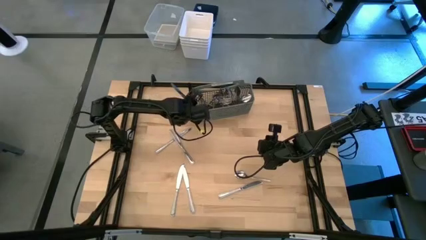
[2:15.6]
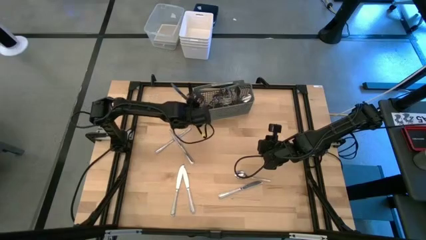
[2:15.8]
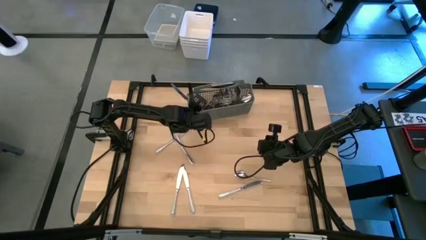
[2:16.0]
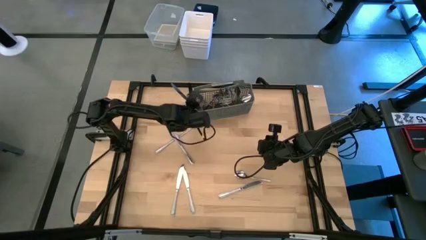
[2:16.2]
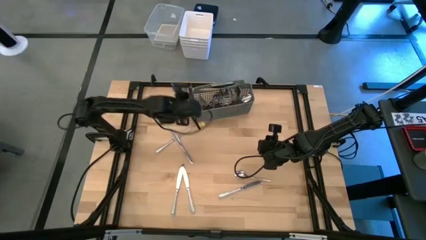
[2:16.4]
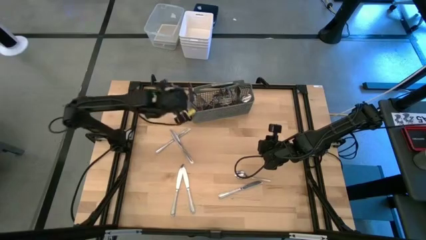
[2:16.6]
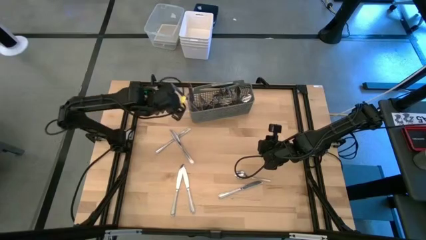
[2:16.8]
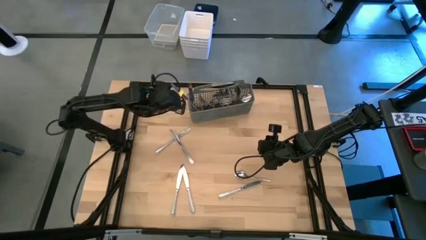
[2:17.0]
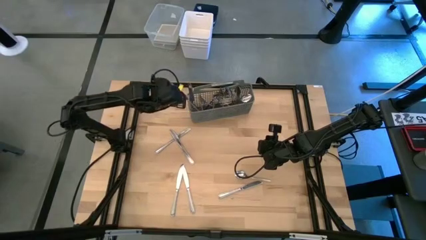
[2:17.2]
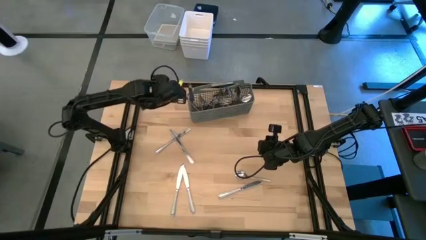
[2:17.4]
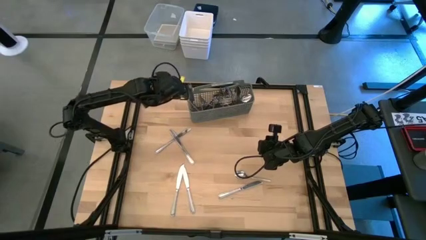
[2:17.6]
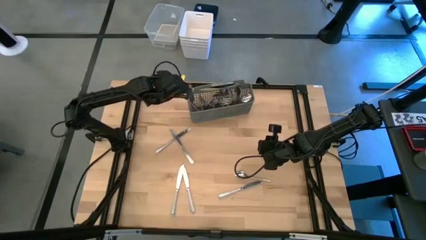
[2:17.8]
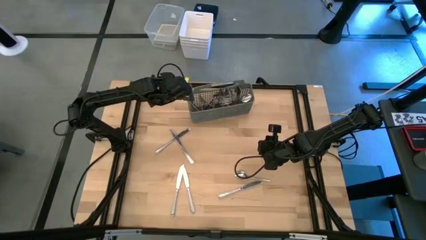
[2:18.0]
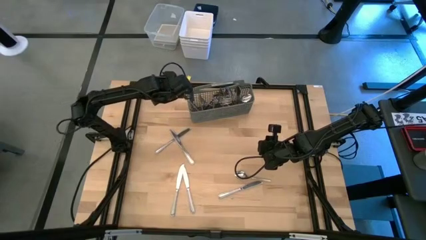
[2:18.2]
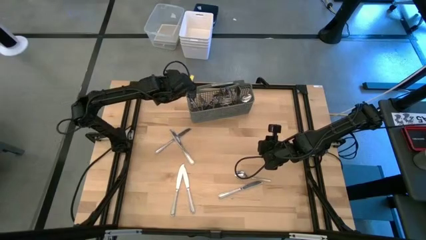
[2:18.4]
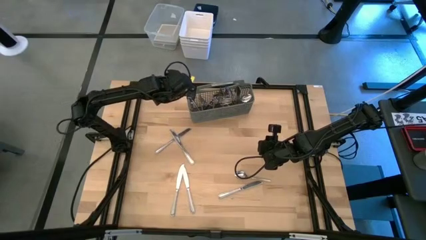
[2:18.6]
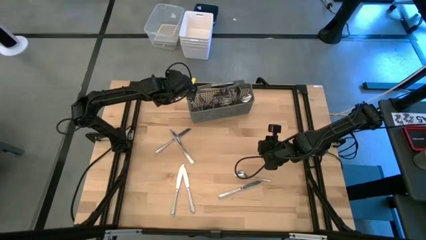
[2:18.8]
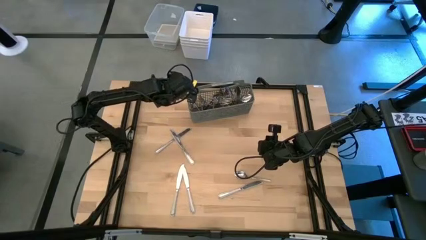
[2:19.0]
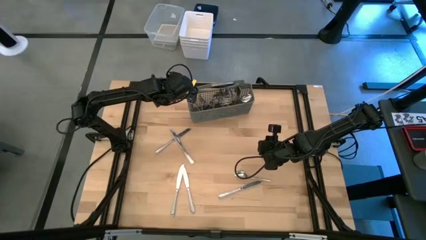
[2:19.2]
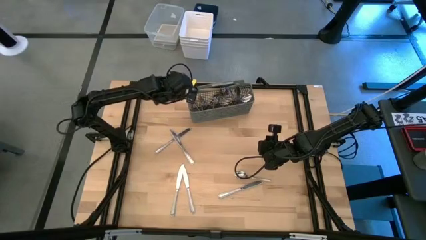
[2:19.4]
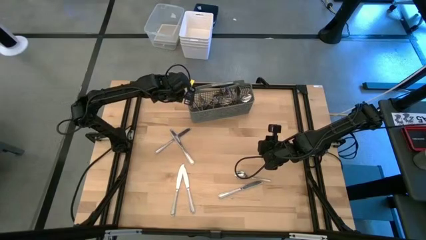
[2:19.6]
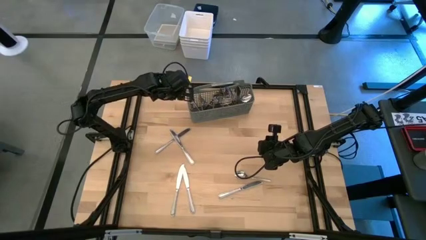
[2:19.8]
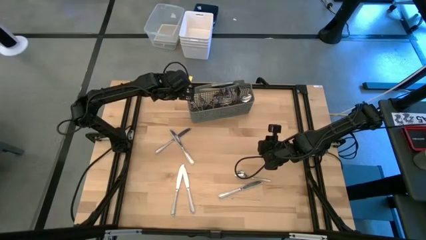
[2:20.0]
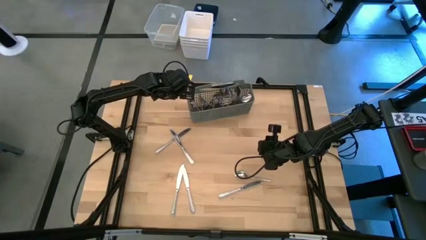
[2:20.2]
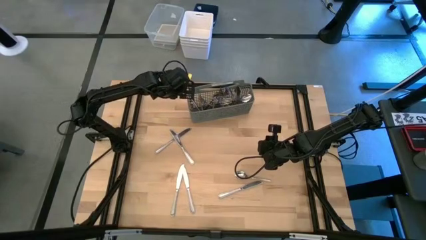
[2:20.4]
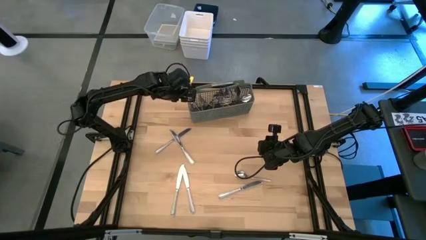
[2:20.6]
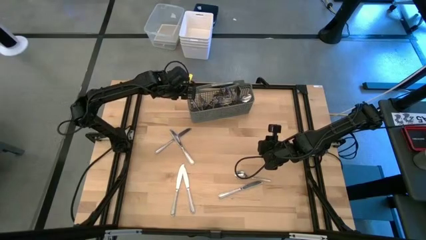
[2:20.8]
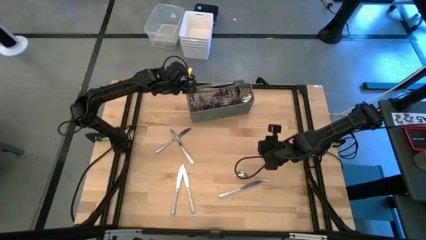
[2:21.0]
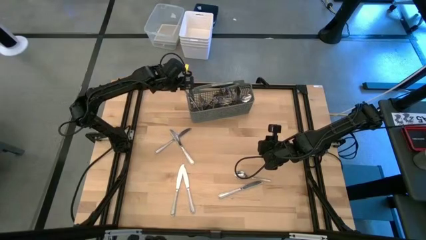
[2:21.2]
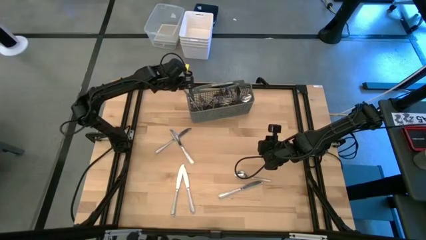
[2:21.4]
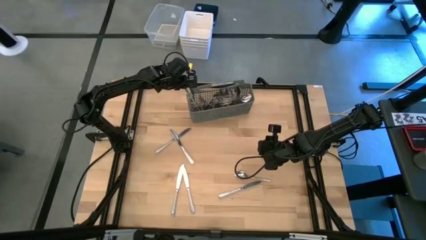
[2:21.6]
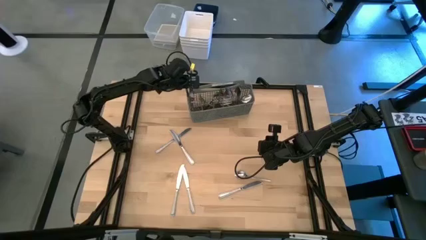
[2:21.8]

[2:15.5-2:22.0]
Task: Sort silverware
Adjust the silver knife into the silverware organizer

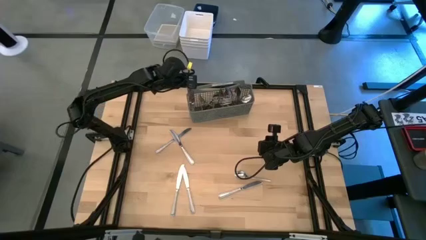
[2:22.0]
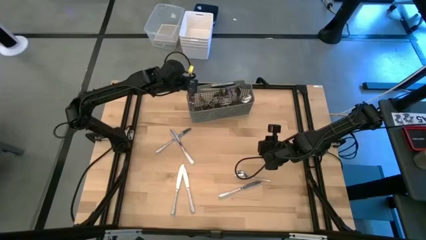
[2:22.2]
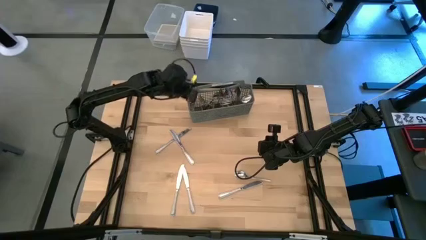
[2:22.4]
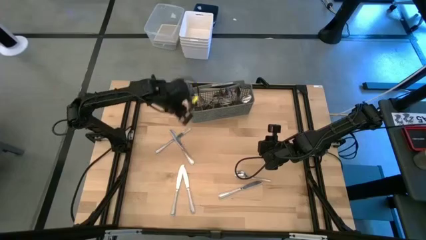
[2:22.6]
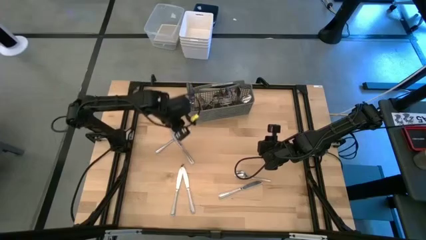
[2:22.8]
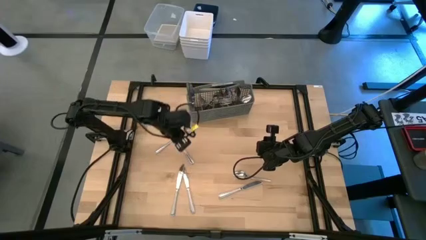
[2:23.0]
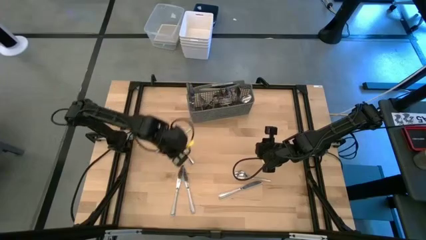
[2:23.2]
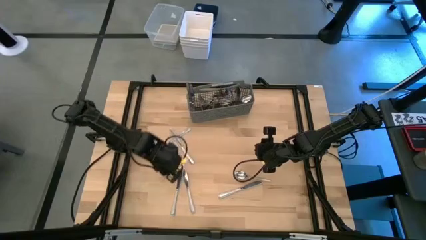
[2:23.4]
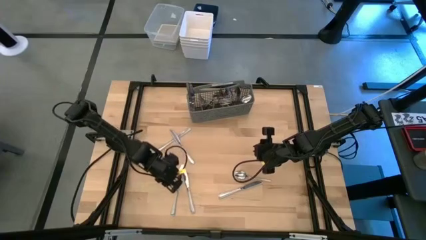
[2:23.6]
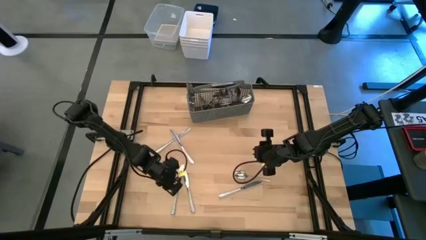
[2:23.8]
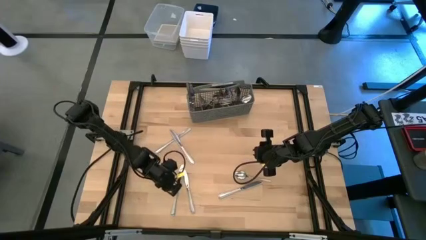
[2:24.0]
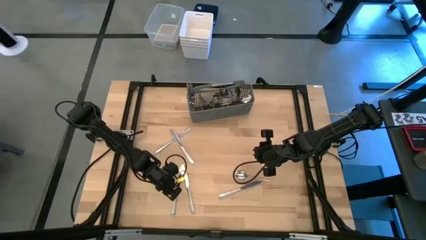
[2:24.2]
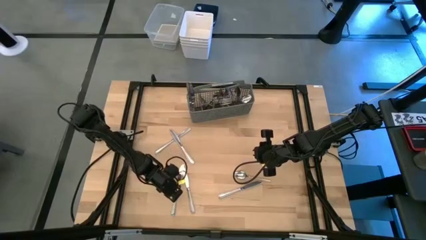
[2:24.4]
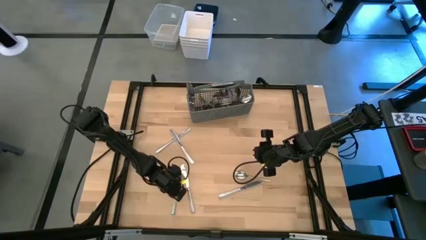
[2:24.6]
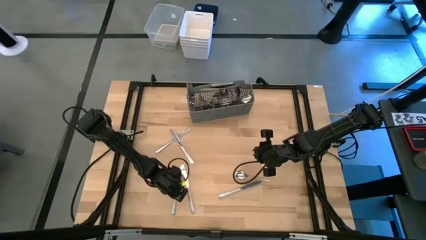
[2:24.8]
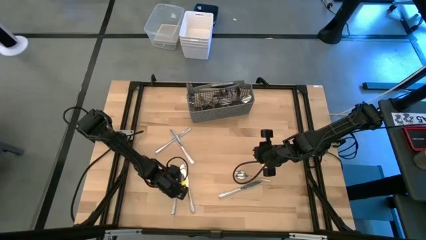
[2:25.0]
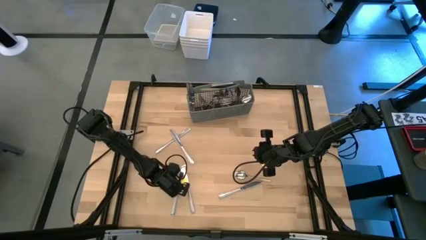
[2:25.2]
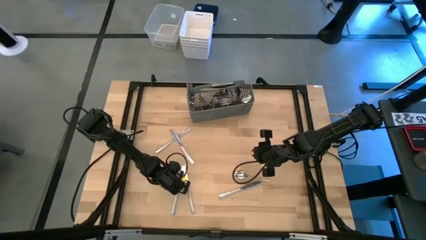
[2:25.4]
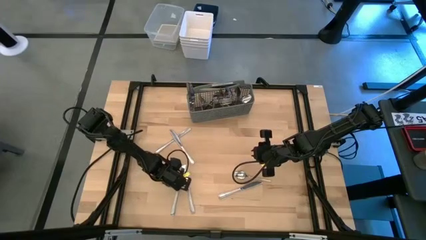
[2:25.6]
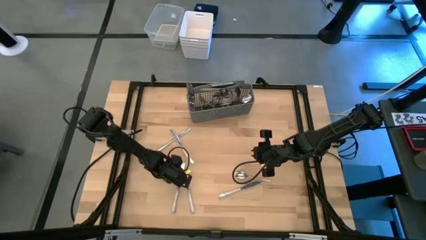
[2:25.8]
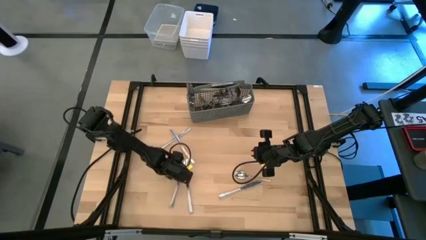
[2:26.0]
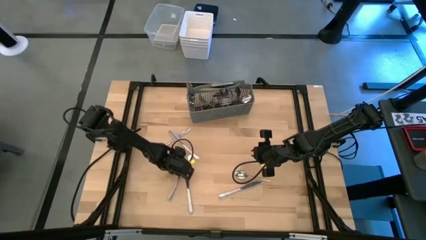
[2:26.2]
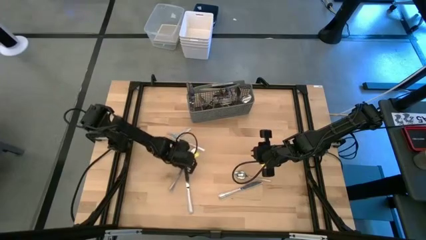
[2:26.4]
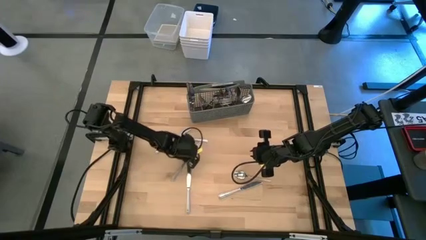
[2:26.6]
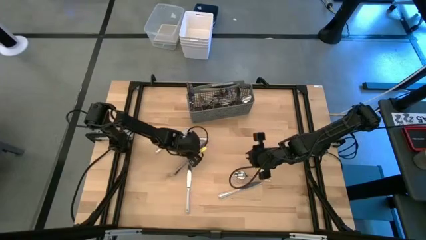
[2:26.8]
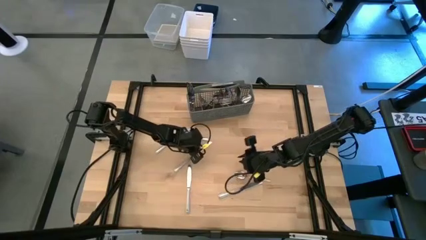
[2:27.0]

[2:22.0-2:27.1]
Put the silver table knife into the gray silverware organizer

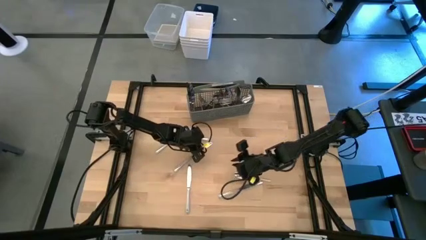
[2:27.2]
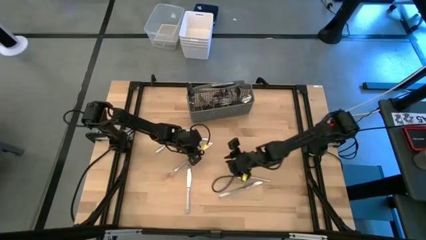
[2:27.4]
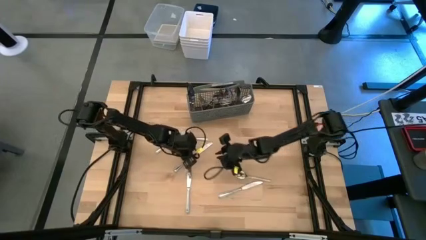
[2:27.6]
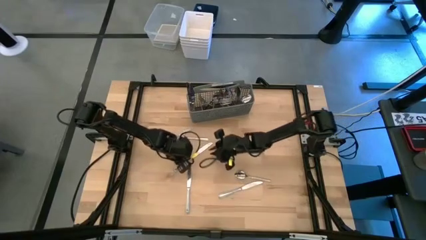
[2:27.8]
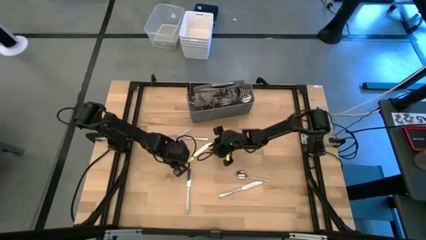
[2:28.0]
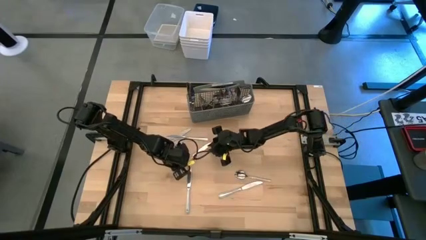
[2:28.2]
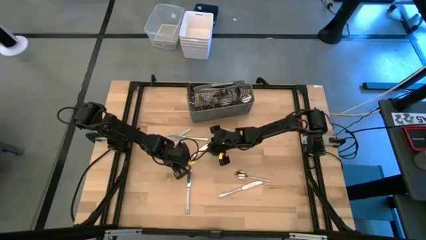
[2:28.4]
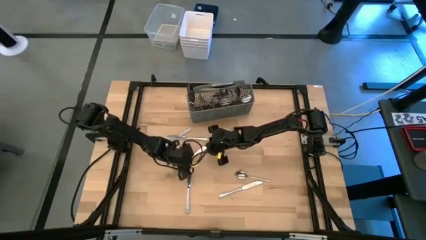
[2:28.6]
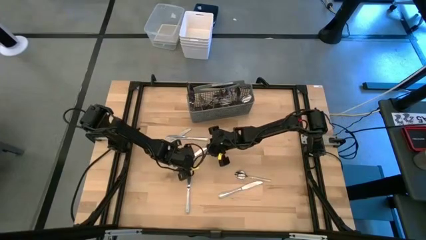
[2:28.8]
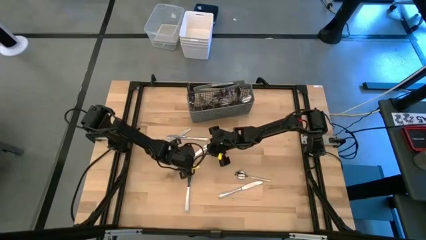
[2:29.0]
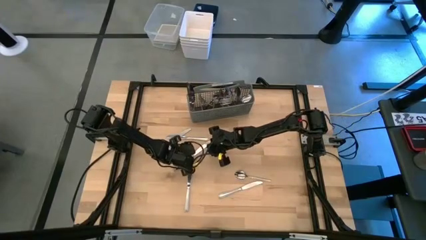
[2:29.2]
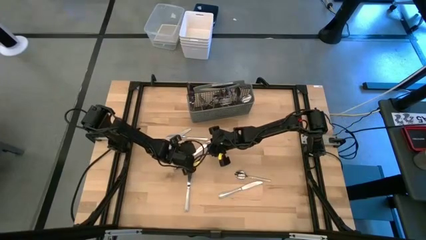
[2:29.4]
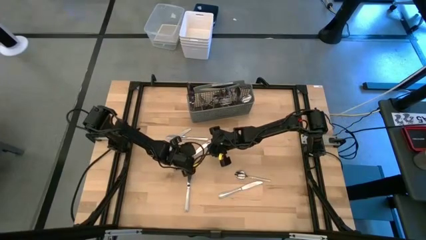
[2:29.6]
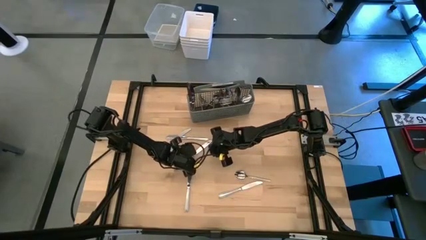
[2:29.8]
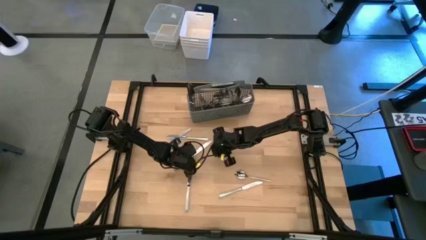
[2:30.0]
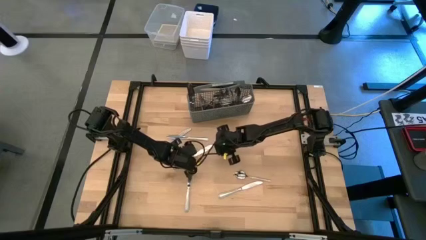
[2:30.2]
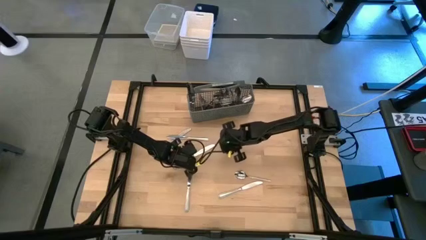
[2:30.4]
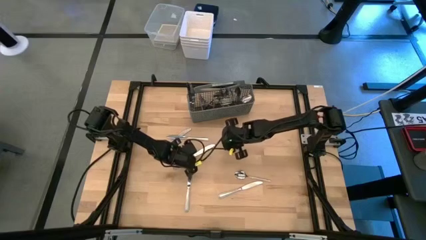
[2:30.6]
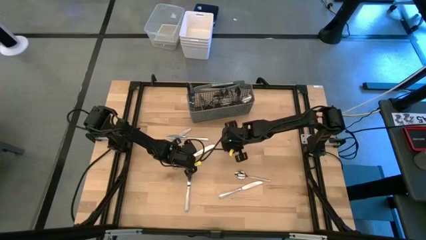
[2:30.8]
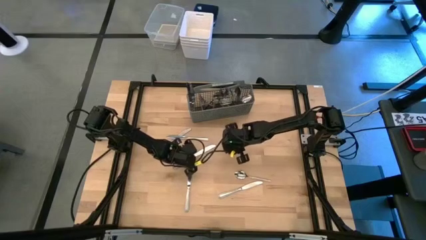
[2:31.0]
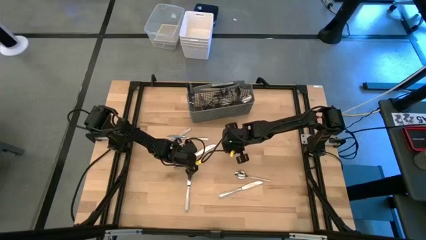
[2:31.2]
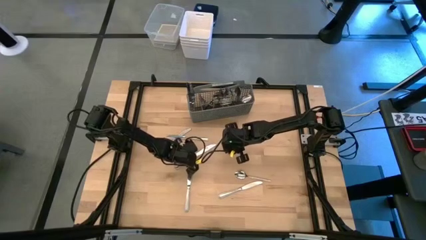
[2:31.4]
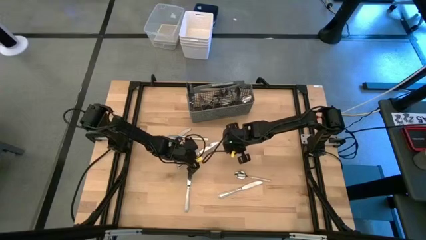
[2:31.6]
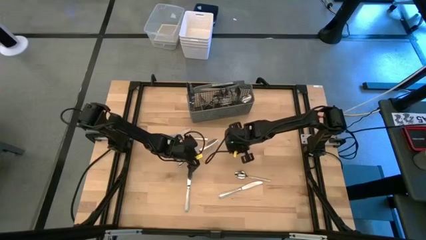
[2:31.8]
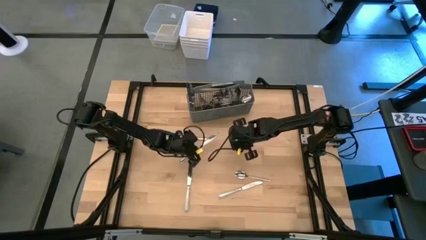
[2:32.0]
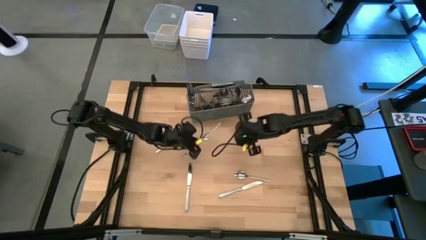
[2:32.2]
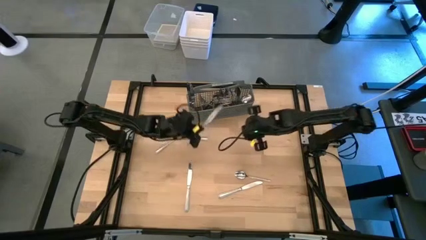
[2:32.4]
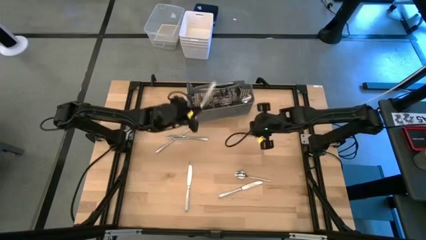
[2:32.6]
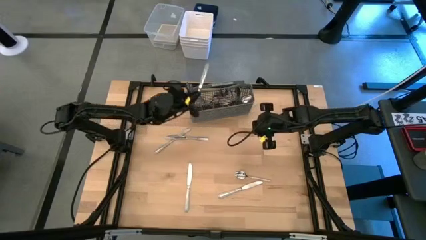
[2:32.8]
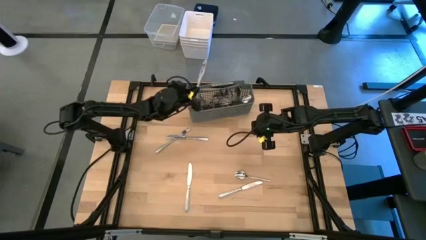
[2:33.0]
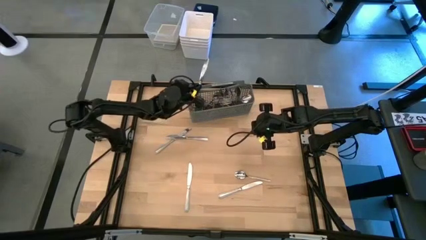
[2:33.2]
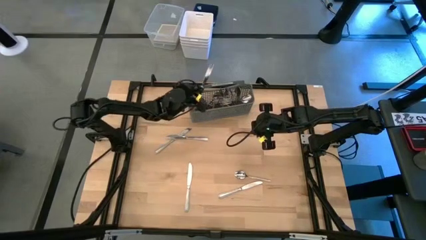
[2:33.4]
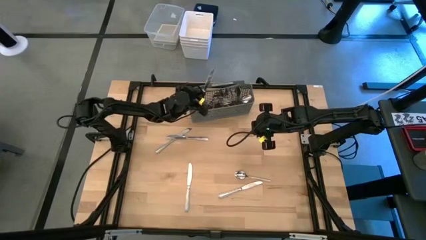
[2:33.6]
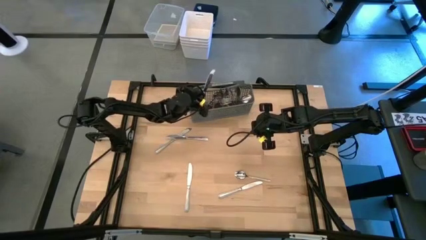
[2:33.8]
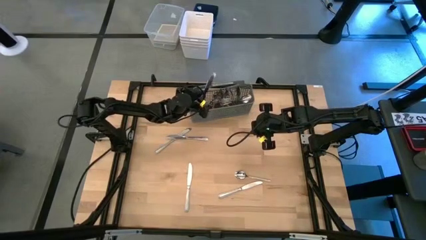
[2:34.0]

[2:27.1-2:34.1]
Put the silver table knife into the gray silverware organizer
